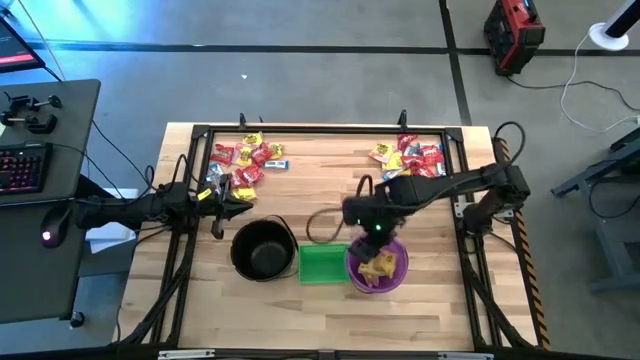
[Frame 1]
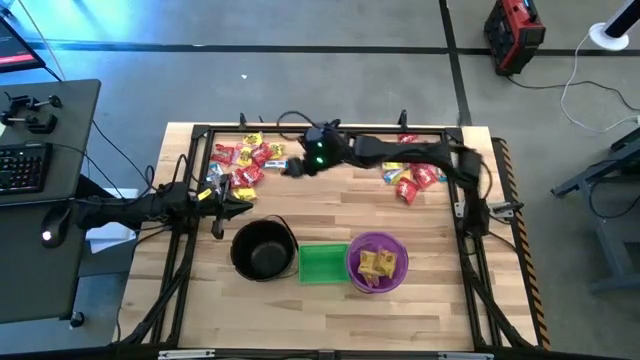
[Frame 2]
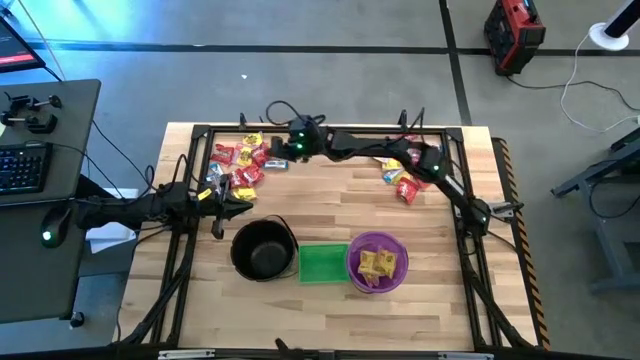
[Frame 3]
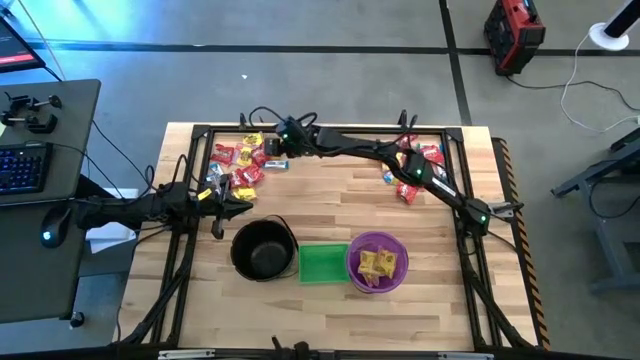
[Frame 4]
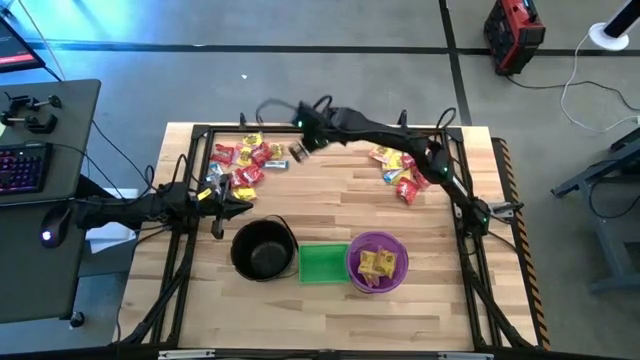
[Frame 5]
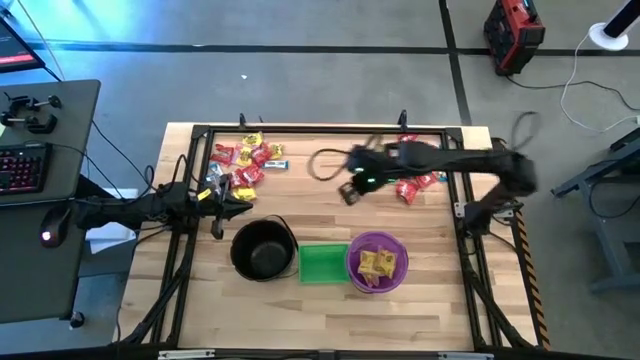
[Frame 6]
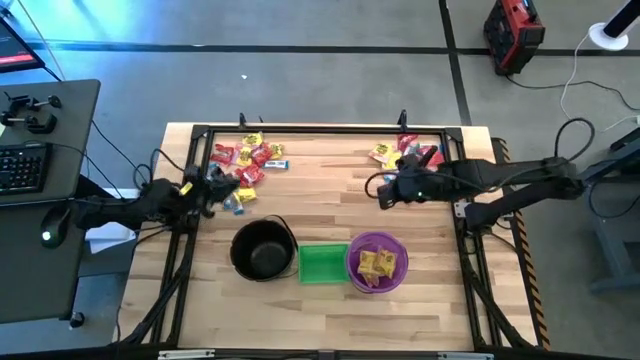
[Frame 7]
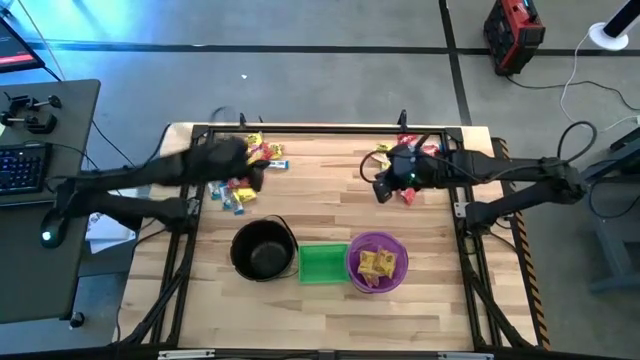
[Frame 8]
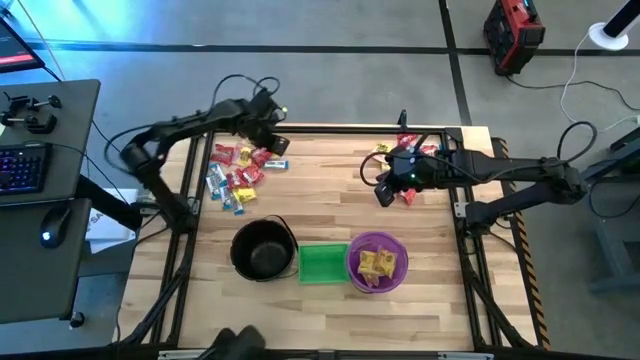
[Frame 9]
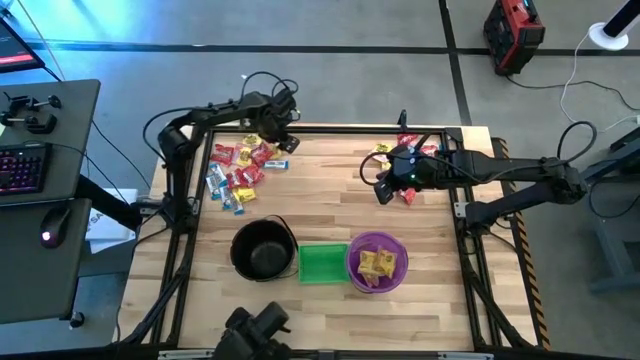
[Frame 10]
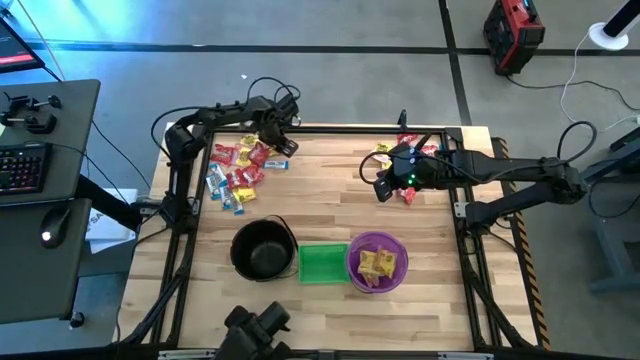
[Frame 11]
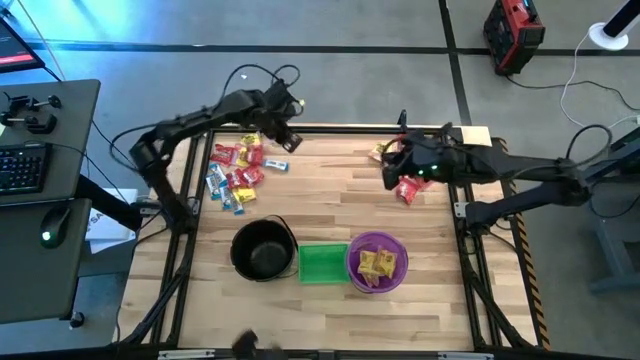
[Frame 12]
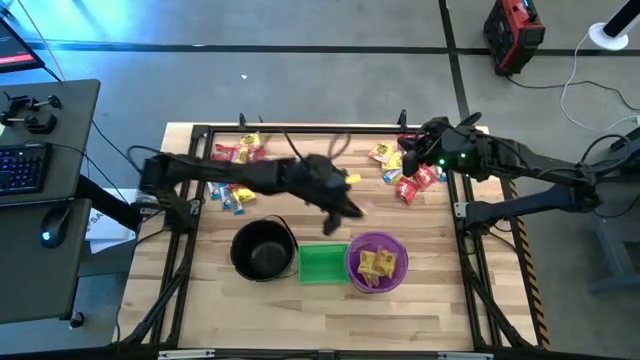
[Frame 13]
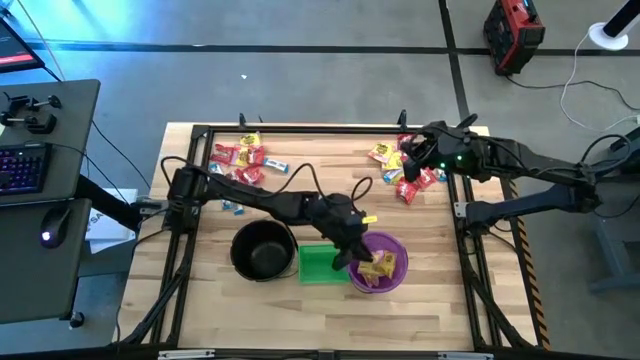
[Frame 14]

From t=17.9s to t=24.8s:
Task: Sort candy by brand, put in halloween buckets
Put the yellow candy into the violet bucket

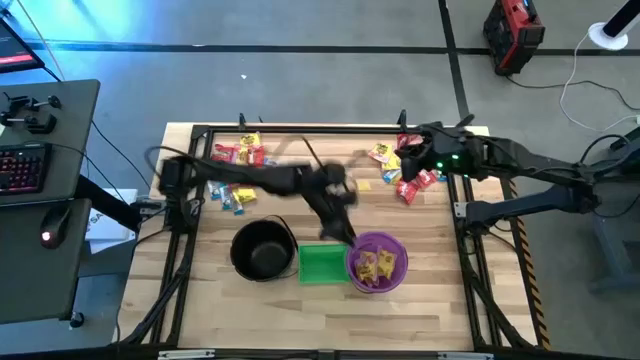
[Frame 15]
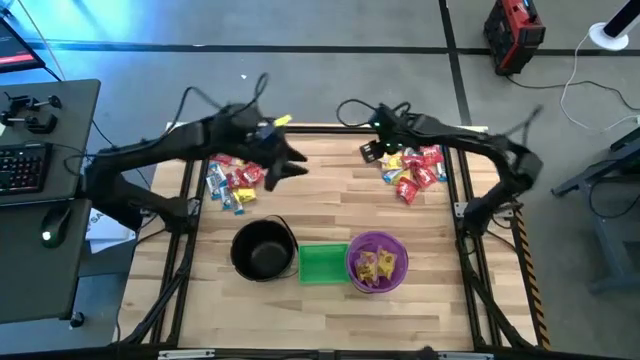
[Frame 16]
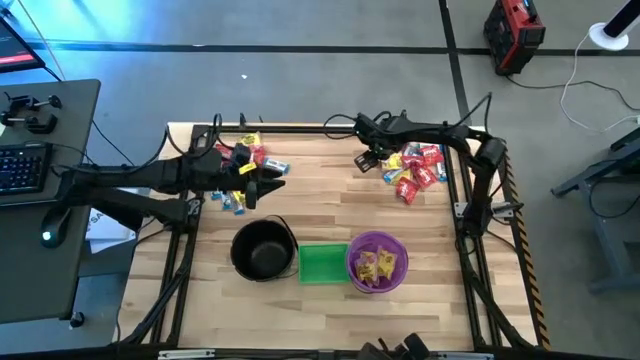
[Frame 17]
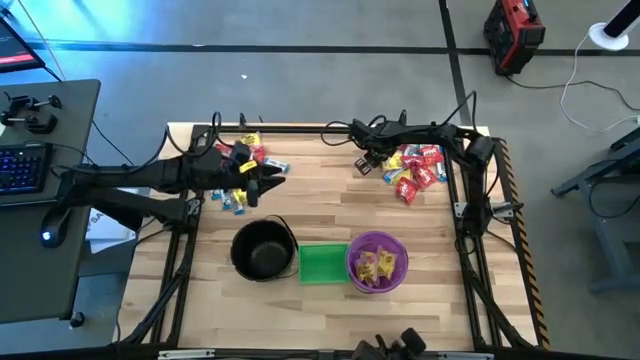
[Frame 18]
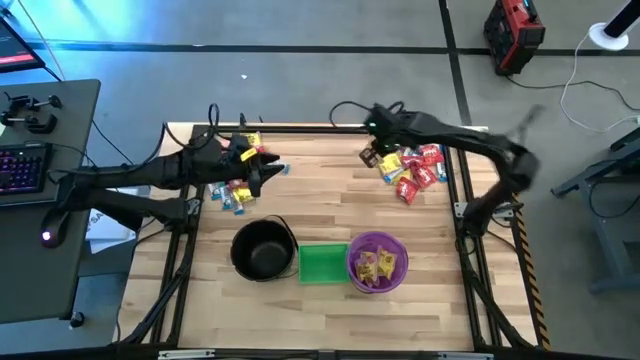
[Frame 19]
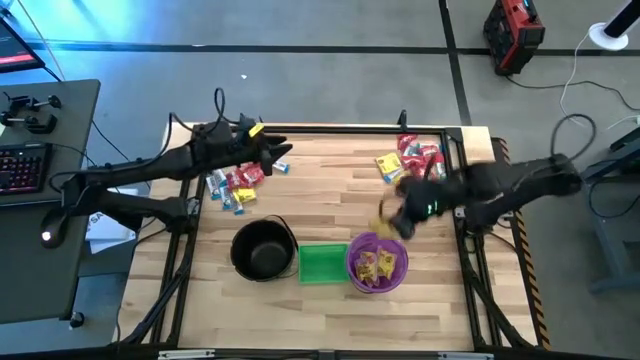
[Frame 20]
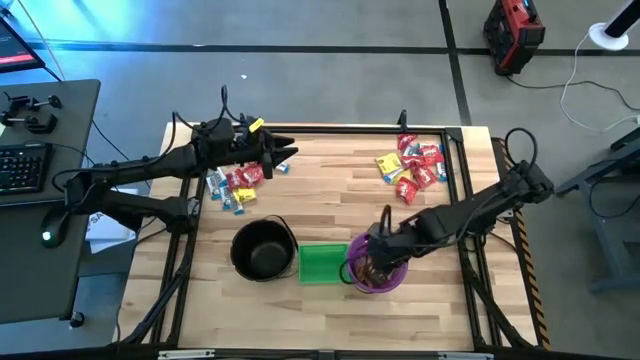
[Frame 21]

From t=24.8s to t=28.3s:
Put the yellow candy into the violet bucket

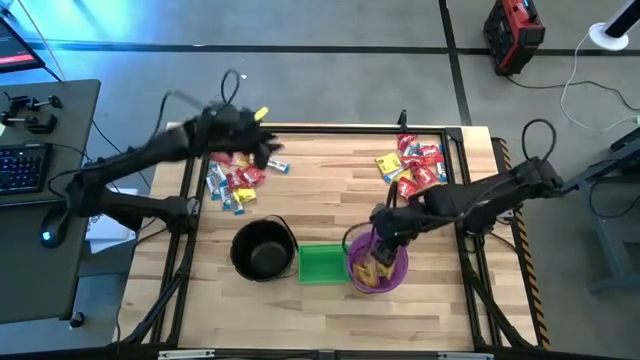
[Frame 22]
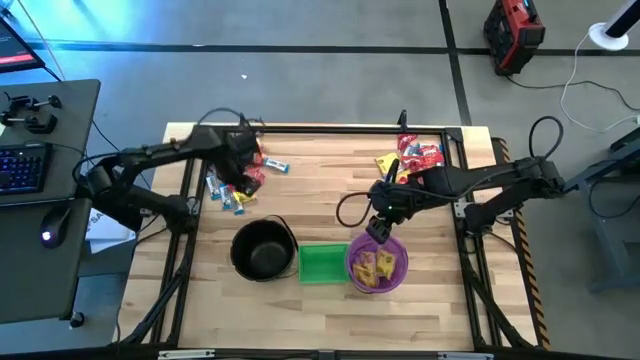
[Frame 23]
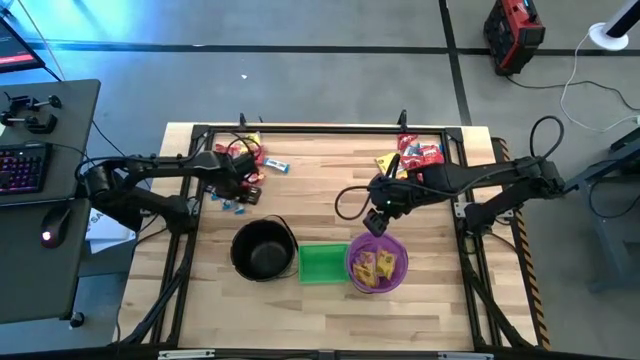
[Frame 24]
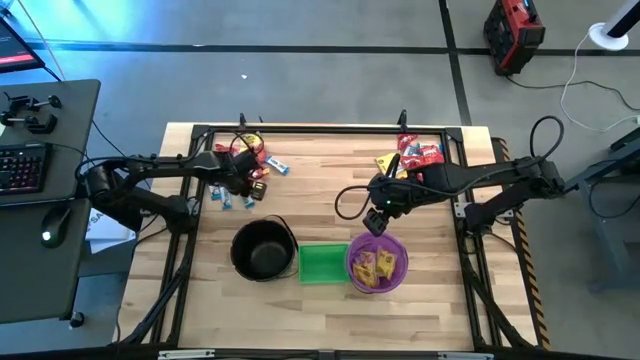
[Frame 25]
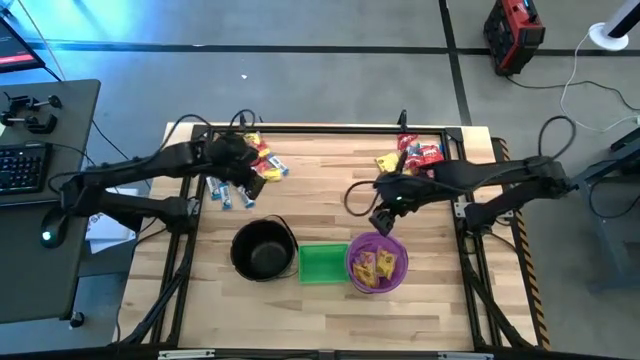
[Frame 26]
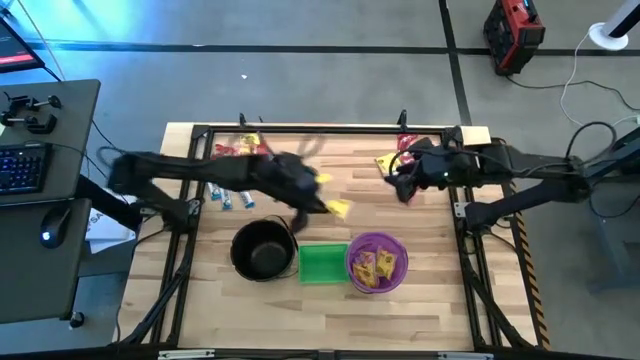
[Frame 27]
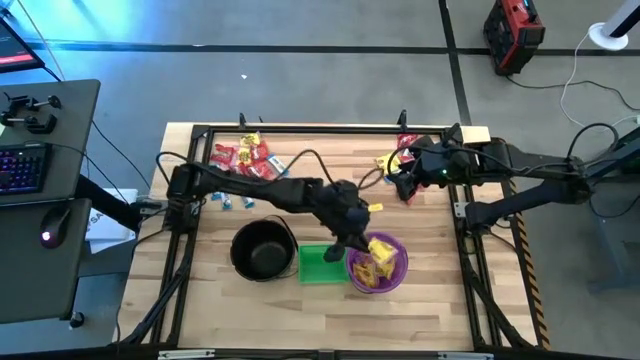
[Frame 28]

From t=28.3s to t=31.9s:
Put the yellow candy into the violet bucket

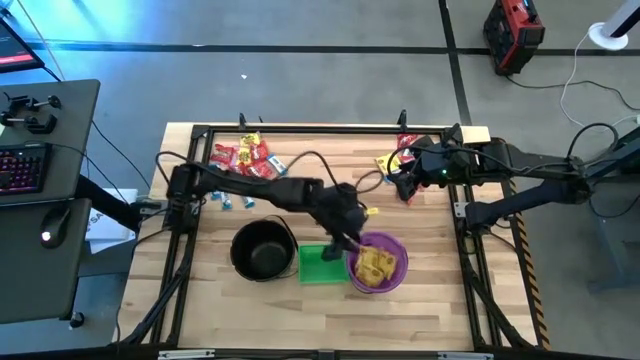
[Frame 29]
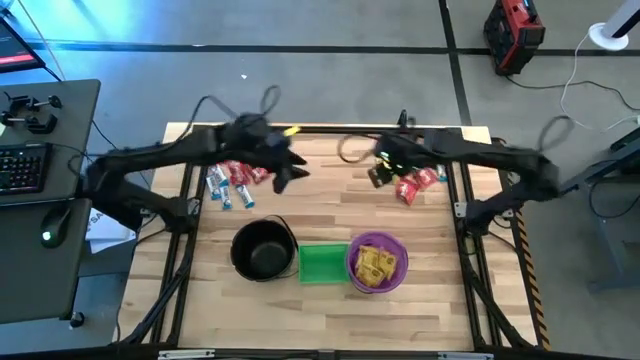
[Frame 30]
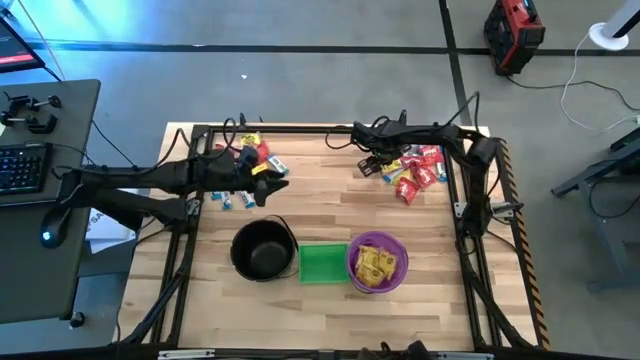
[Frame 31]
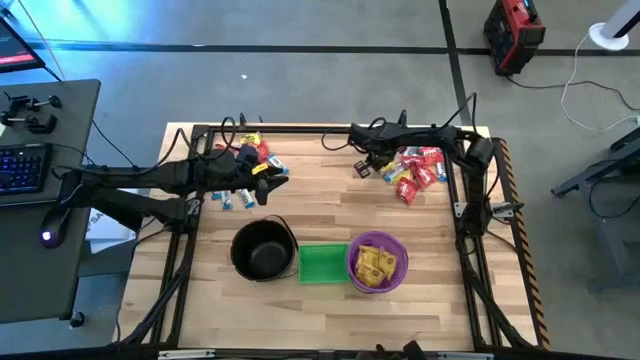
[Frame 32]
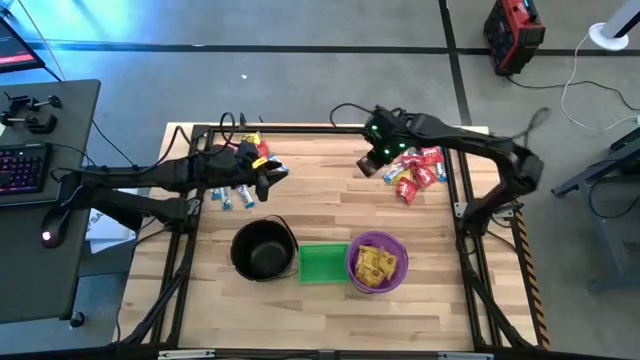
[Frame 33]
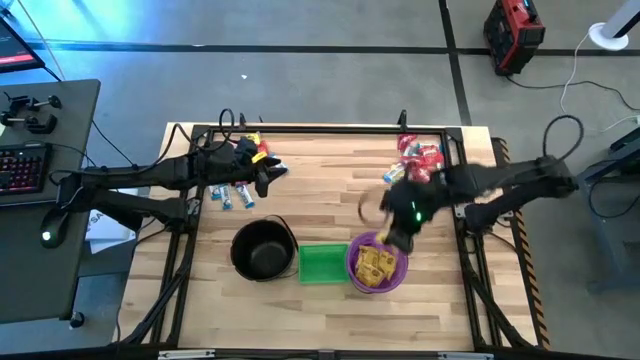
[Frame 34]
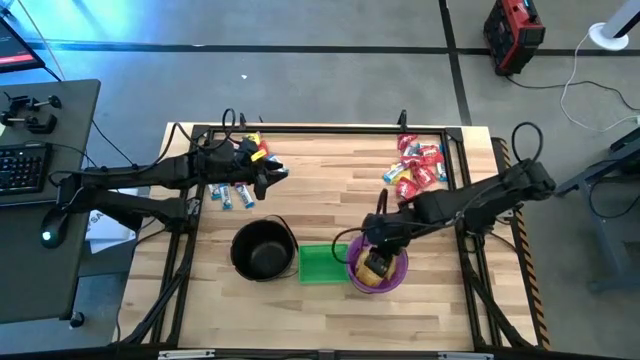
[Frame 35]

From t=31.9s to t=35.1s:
Put the yellow candy into the violet bucket

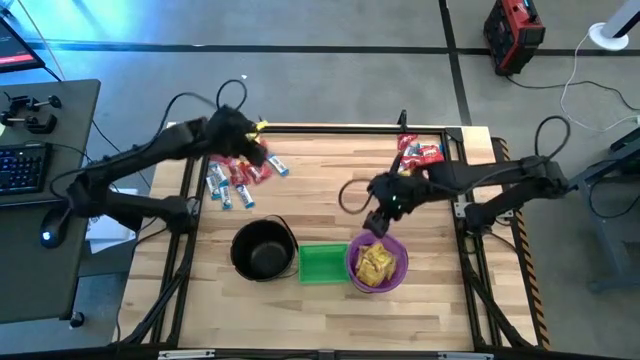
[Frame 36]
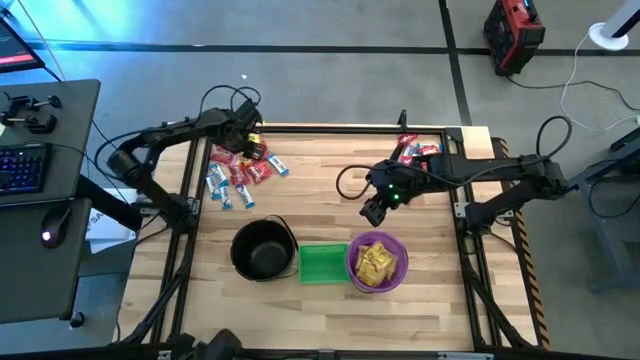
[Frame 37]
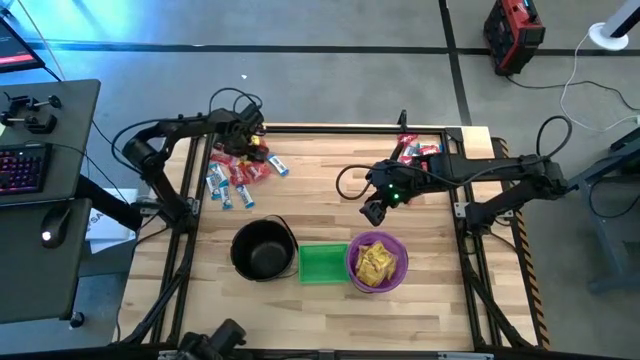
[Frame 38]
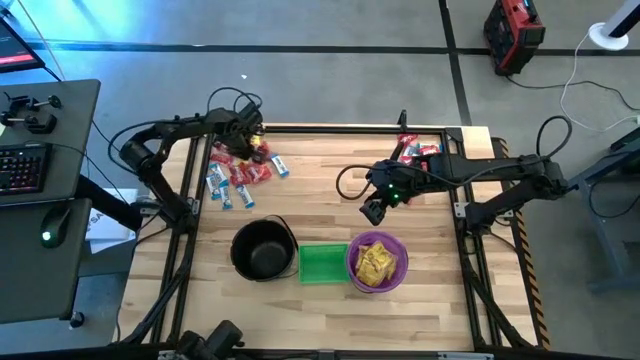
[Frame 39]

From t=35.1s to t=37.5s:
Put the yellow candy into the violet bucket

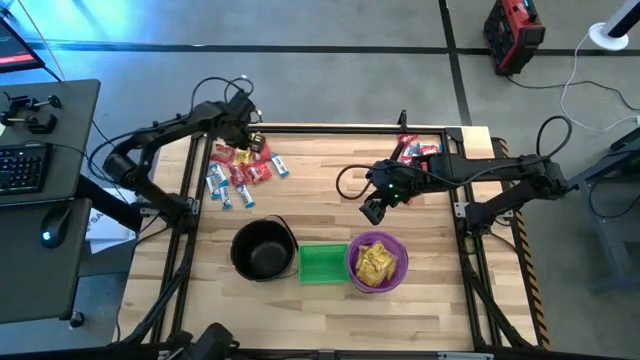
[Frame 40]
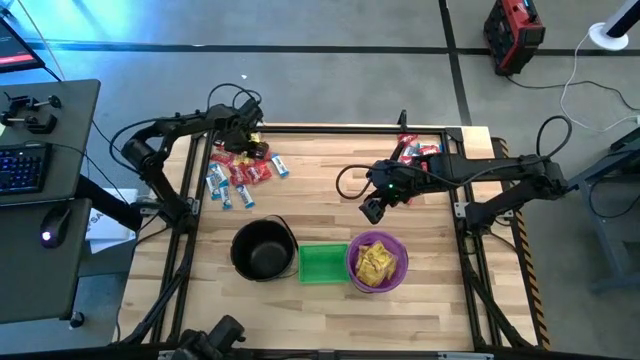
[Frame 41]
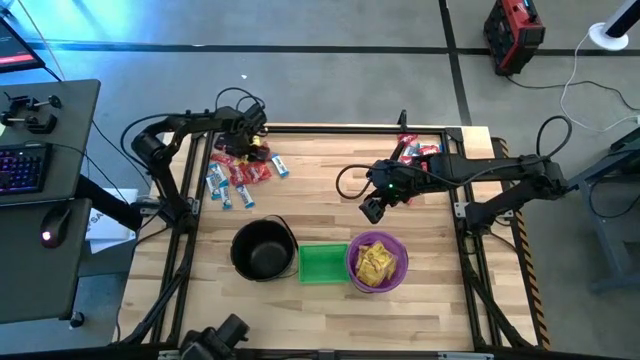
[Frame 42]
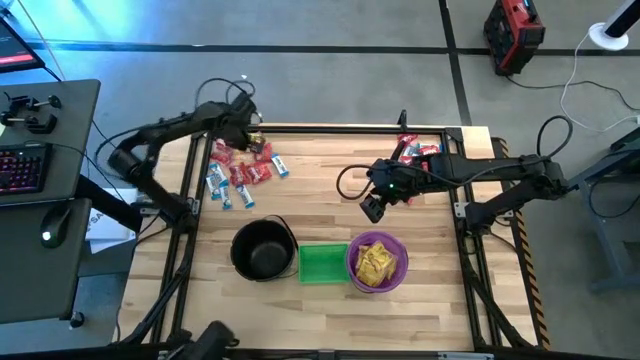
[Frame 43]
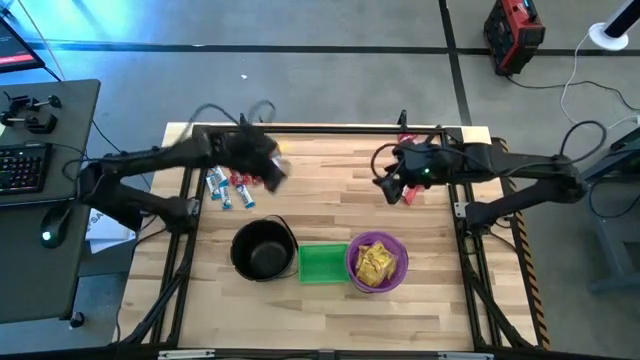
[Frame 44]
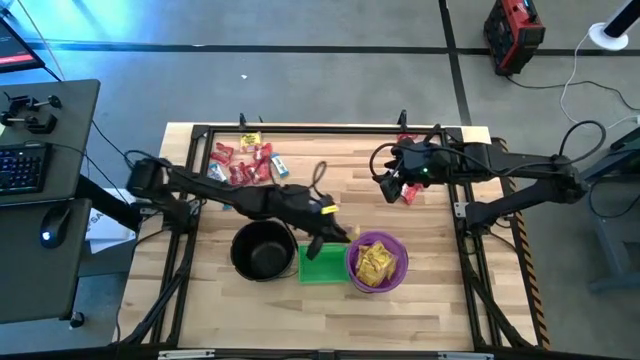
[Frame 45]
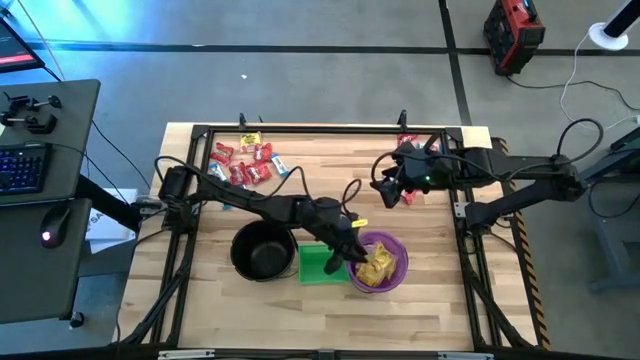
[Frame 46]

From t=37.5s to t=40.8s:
Put the yellow candy into the violet bucket
